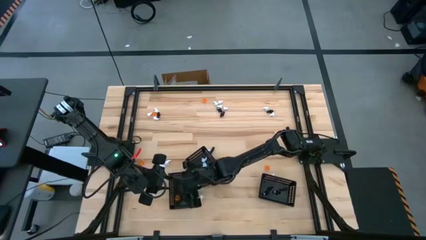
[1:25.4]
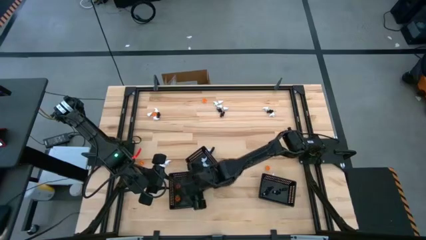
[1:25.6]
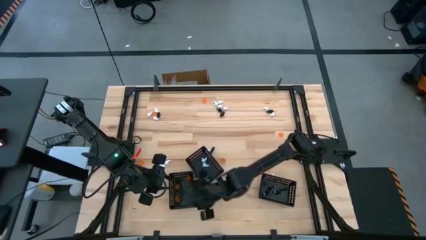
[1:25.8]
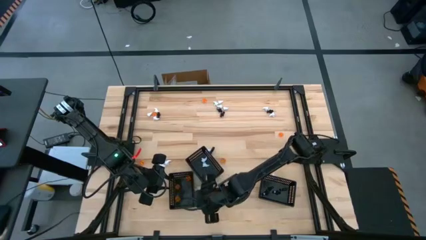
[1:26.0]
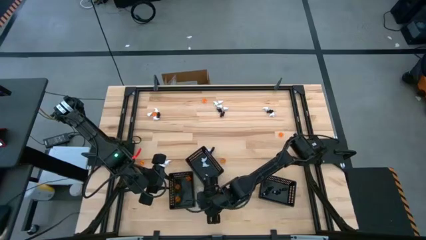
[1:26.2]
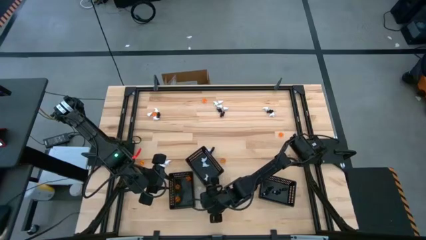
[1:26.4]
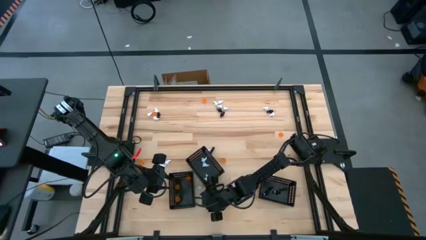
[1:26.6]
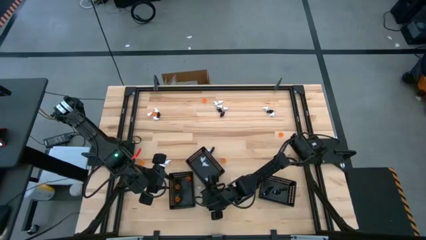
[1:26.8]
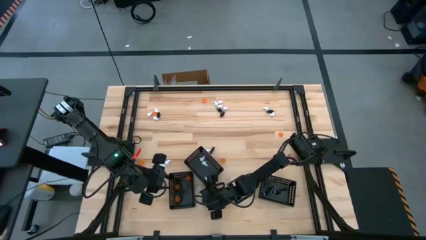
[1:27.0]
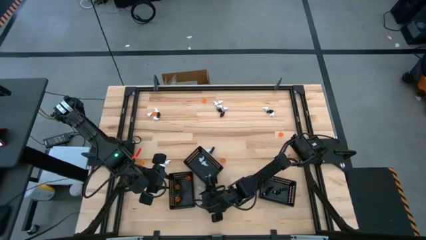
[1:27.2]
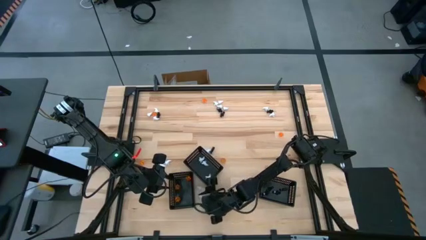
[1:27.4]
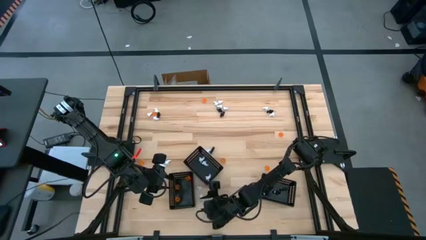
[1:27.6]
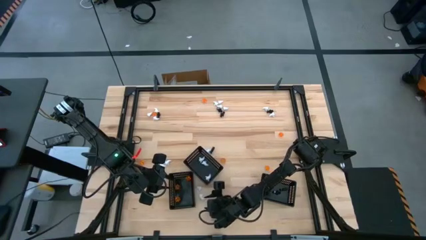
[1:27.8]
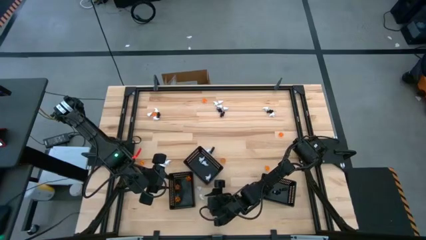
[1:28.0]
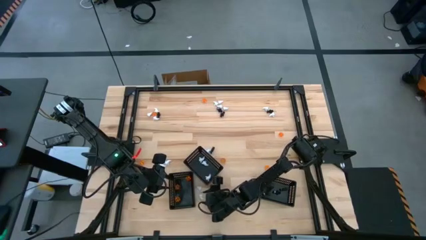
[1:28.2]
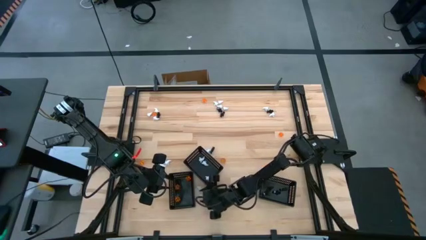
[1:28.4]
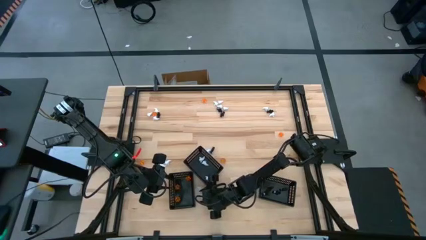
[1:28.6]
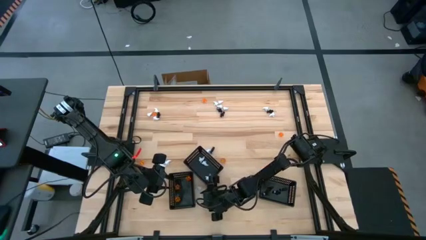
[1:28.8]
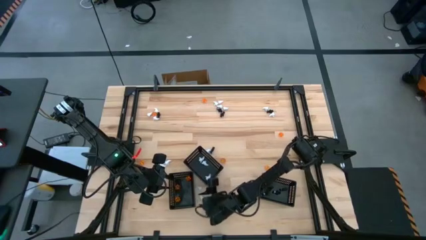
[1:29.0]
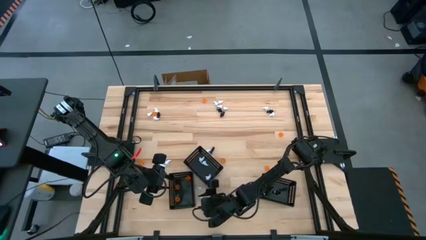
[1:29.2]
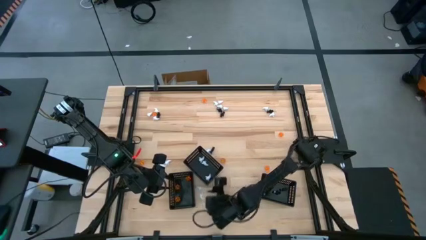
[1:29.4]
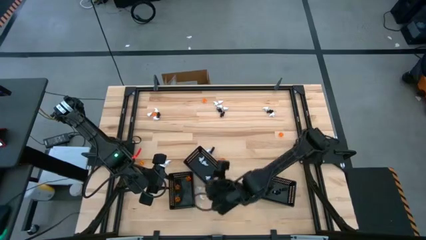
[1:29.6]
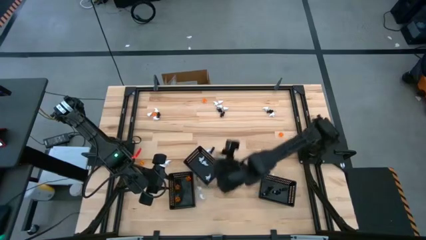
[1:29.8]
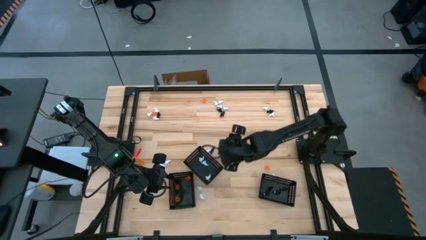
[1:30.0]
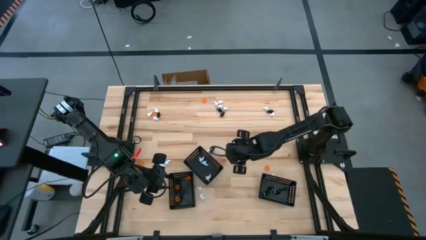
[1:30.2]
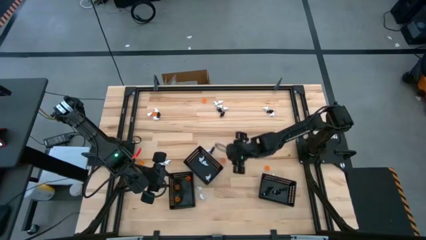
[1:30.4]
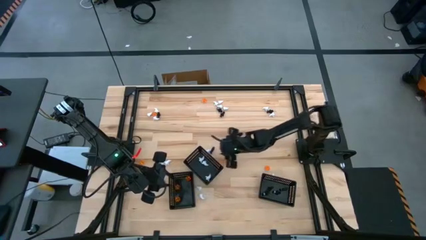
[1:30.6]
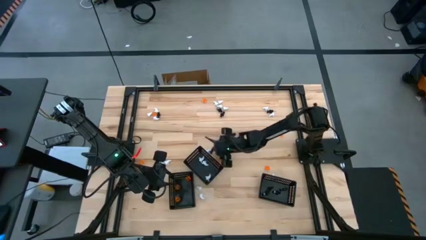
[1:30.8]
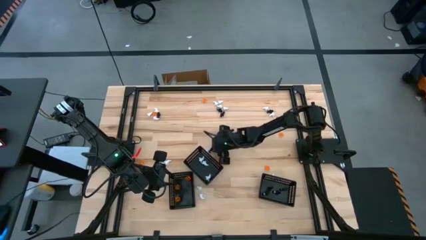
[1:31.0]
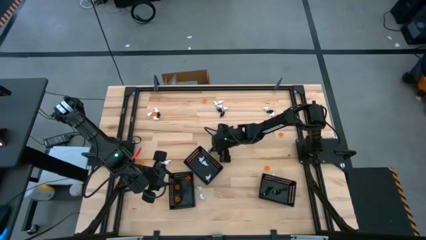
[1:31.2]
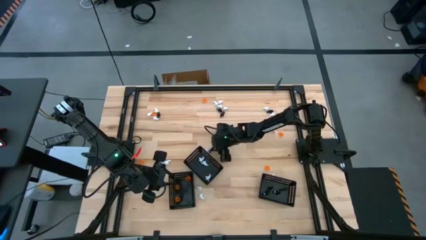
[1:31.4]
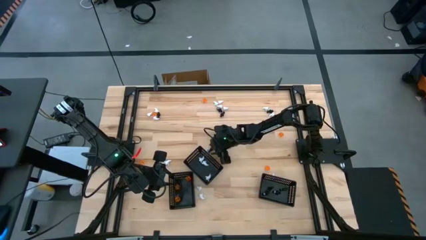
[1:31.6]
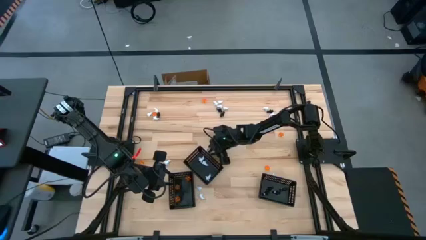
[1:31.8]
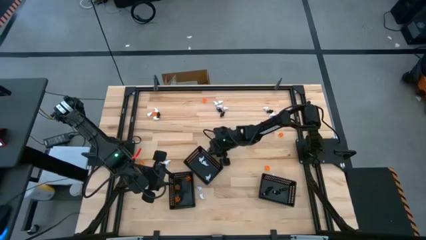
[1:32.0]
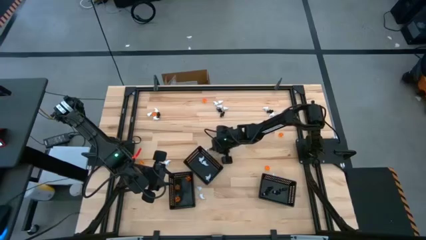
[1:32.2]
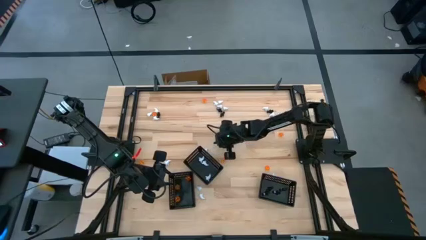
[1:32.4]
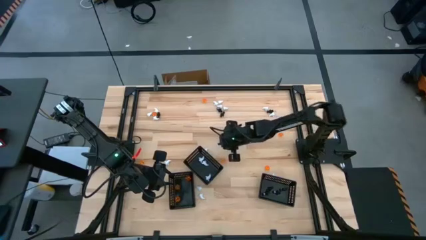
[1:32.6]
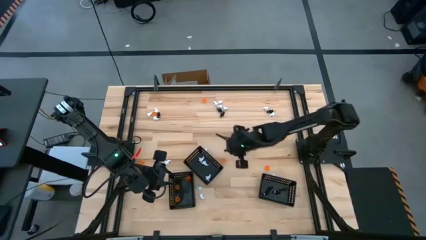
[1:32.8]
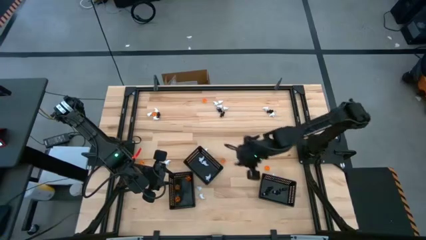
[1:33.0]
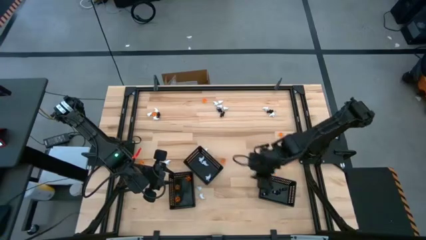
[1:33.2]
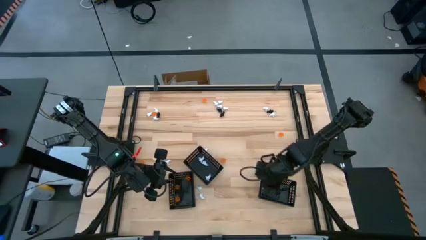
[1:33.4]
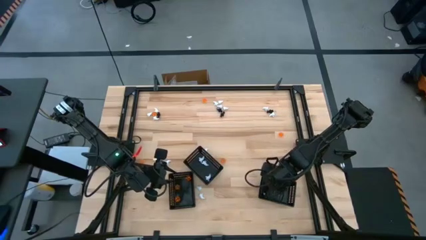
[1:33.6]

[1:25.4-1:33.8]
Task: Sort Halloween decoration
Put the black skeleton toy into the right black basket

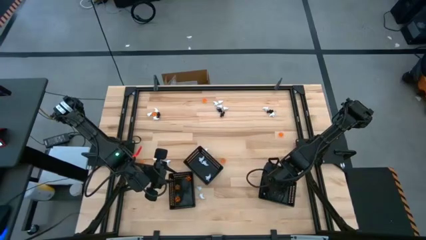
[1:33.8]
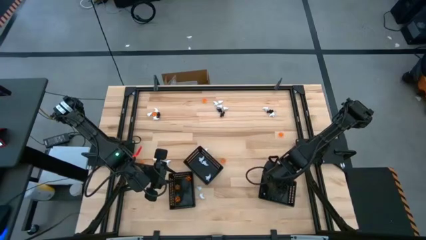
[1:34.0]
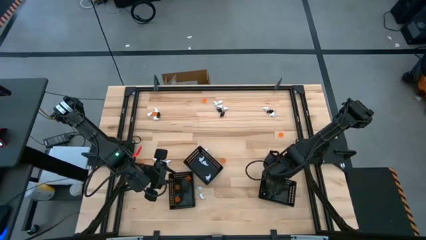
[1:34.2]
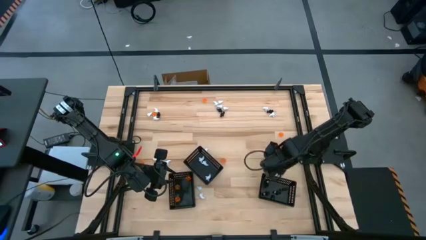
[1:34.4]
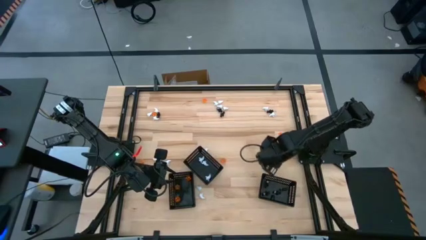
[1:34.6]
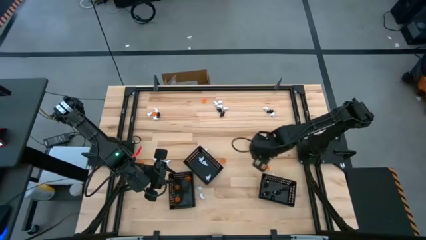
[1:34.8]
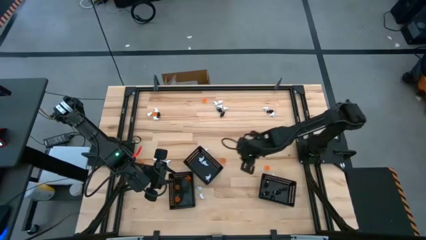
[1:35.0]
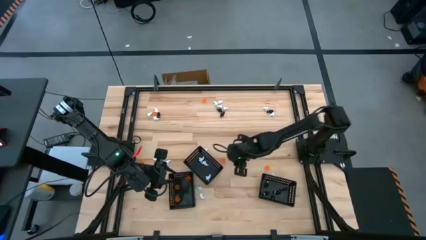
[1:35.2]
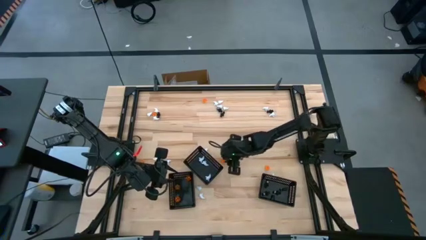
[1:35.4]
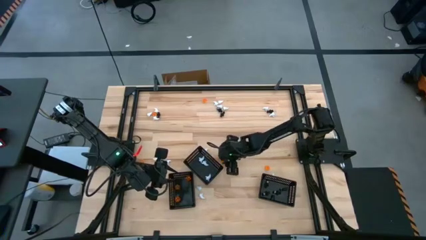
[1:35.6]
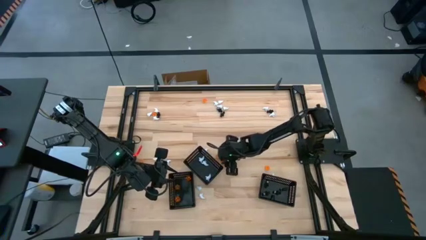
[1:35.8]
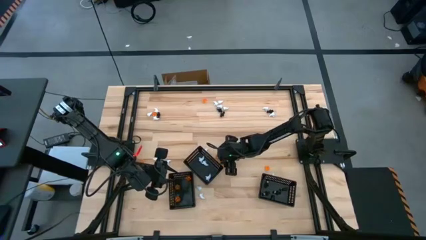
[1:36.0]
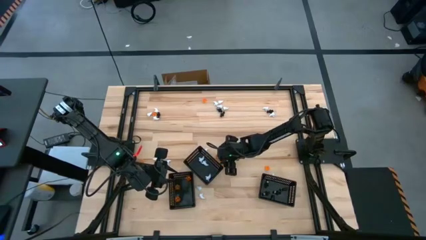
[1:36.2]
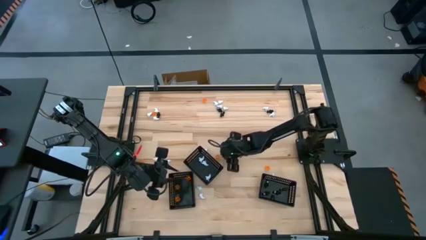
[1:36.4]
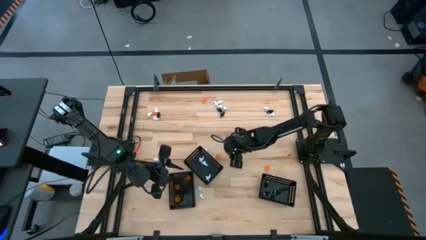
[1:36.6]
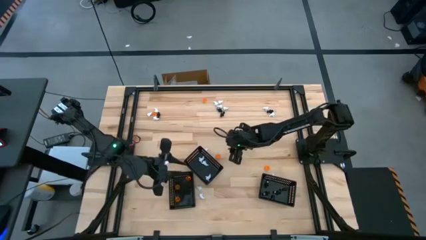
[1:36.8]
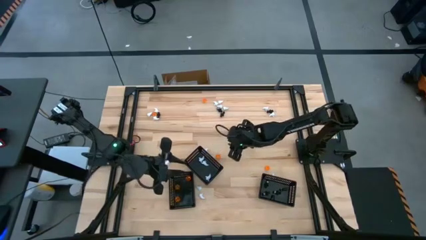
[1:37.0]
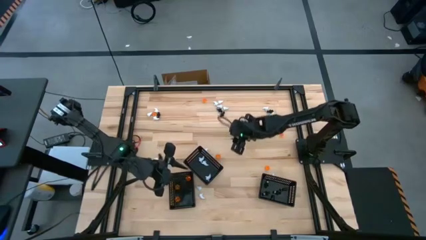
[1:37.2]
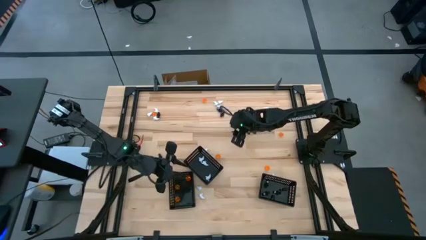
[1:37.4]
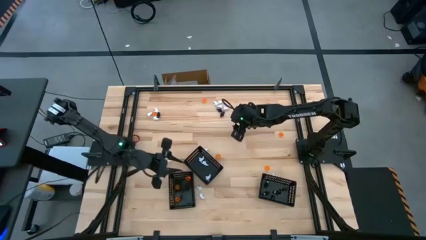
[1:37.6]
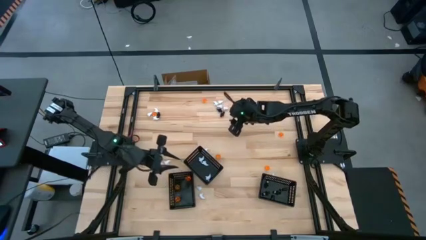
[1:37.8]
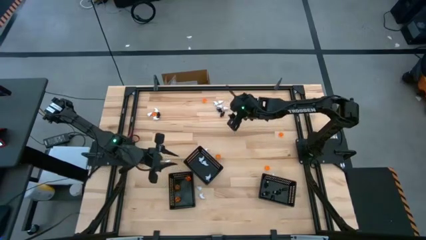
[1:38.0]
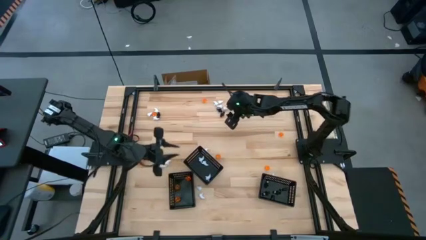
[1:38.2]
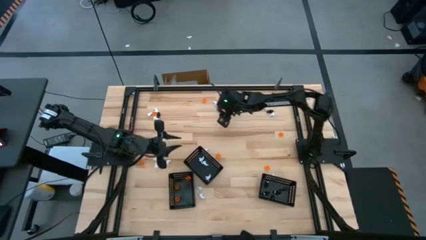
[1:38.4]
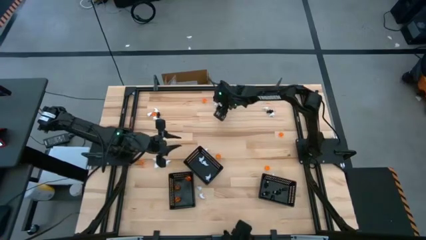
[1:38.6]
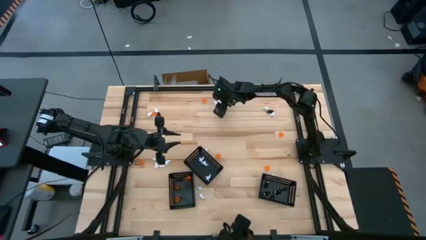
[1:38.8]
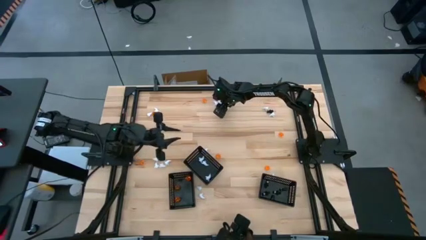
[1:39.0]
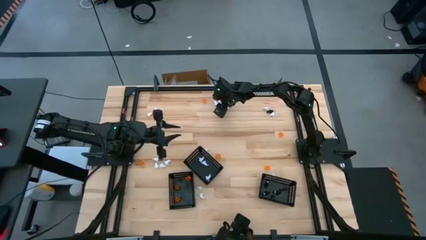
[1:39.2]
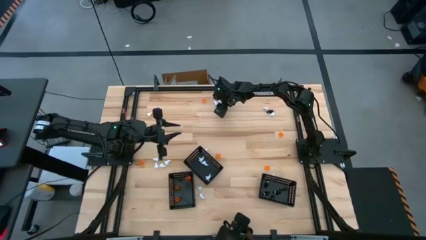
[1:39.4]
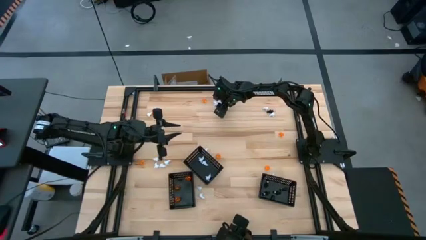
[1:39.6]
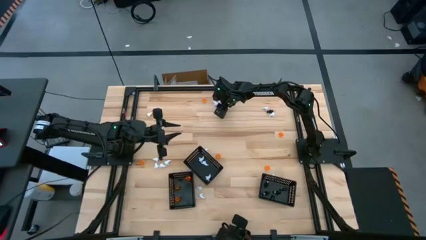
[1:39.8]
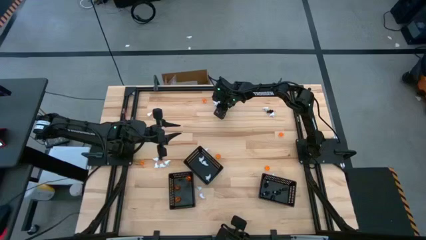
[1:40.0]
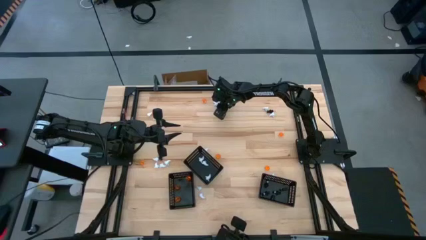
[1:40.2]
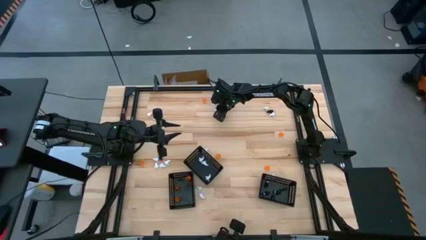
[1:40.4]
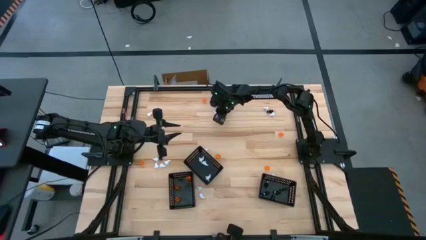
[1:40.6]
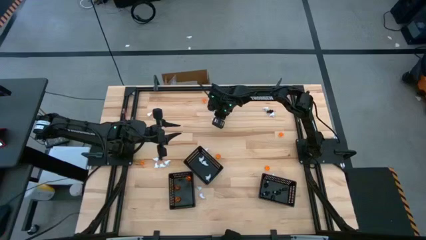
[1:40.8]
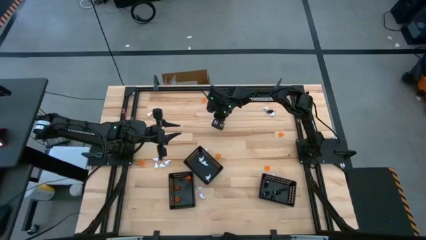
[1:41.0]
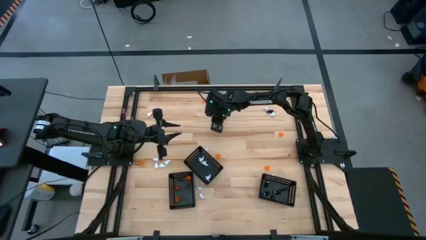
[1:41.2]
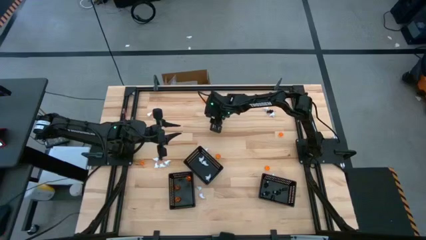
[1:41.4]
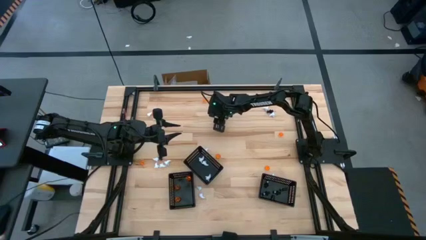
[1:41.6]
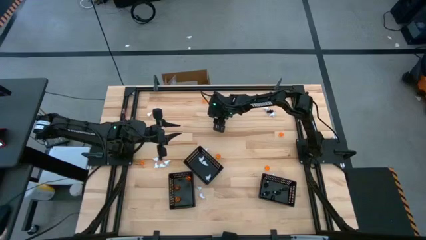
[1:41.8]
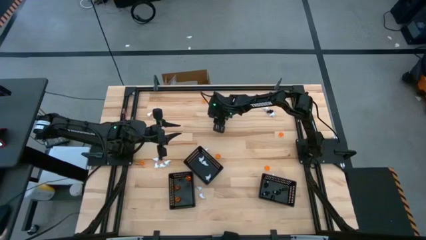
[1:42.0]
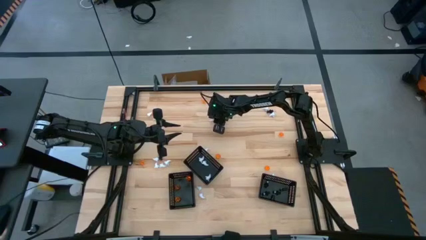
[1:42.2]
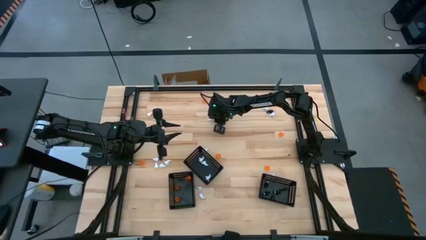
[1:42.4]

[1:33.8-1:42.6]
Put the white ghost toy into the middle black basket
